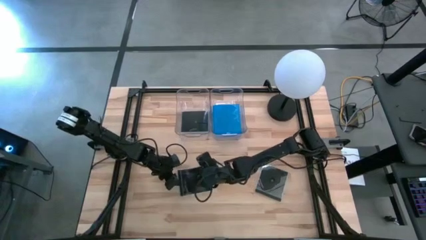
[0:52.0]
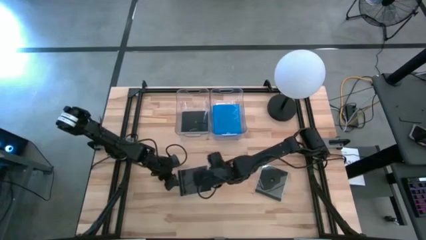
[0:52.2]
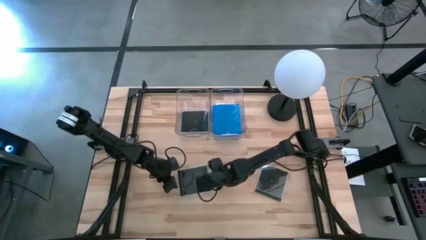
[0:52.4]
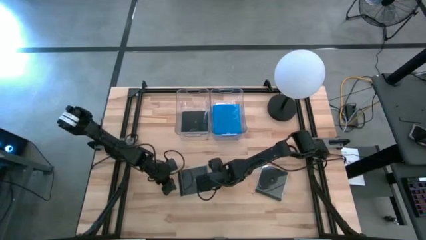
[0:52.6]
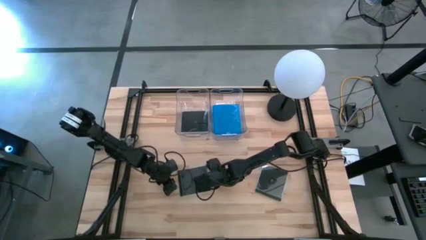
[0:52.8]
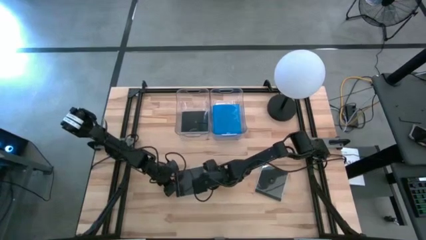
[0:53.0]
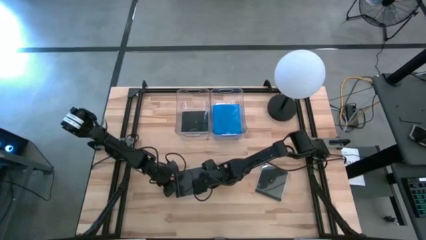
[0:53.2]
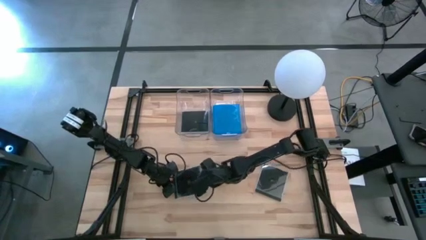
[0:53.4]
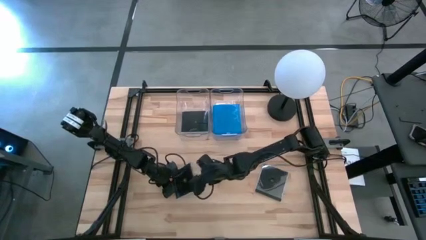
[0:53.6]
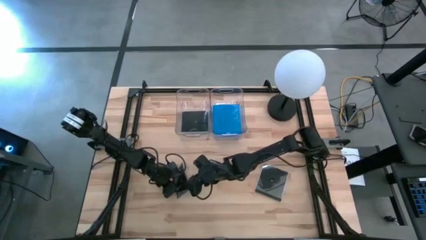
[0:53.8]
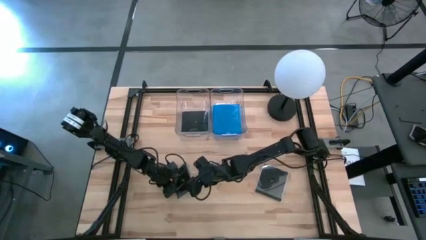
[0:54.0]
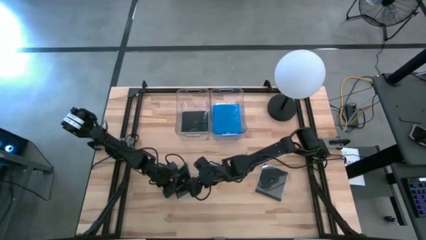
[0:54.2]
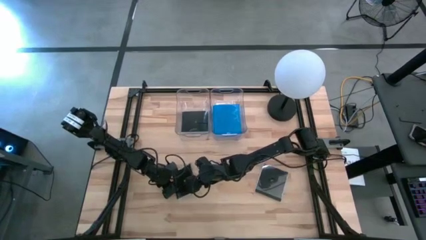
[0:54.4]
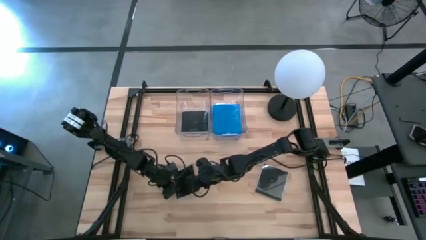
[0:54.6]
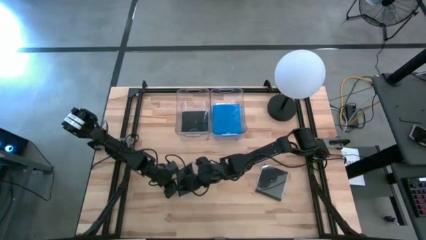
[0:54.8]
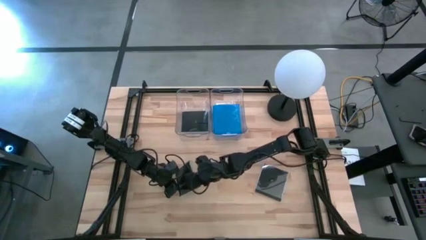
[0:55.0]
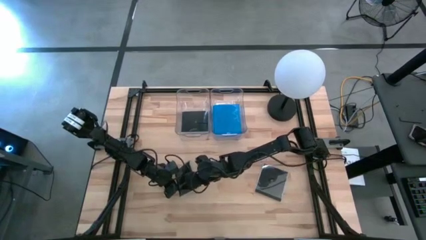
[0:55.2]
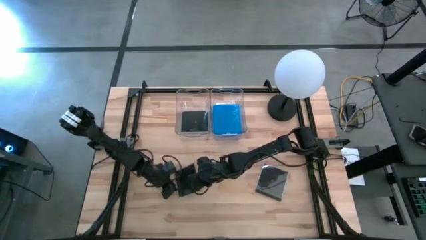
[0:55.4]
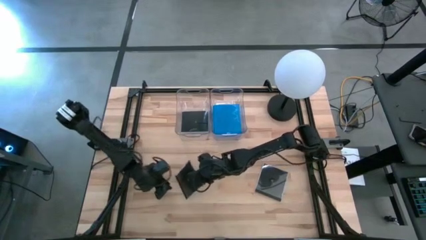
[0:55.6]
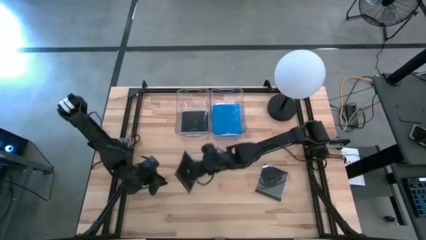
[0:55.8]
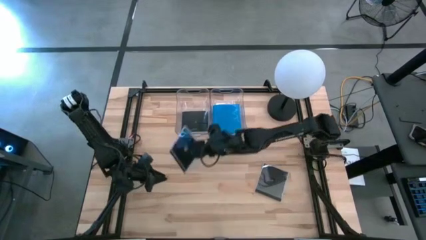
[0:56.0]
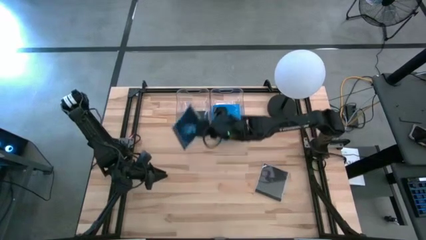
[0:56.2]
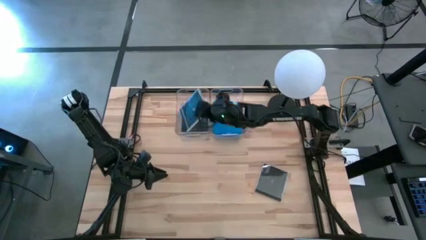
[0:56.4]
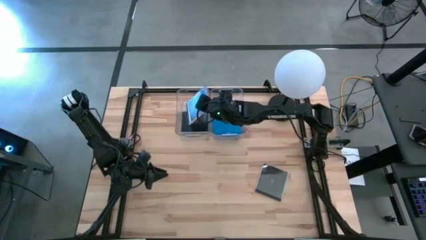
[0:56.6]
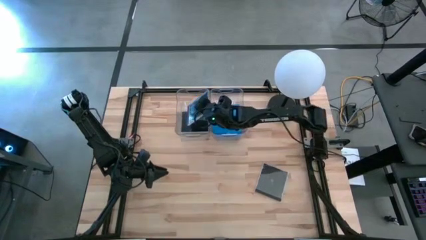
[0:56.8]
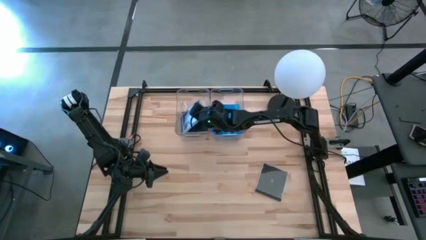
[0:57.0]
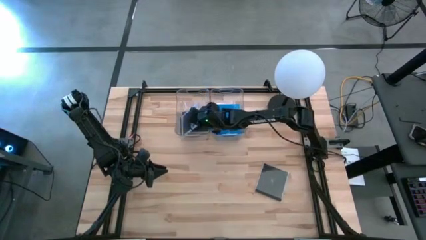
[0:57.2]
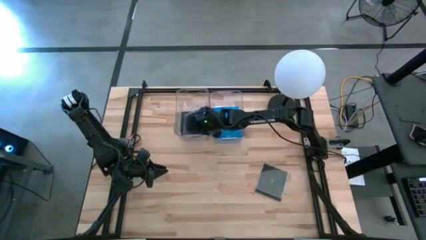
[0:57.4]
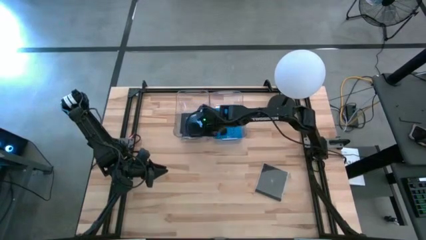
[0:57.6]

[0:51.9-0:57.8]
Task: Pick & place jewel cases by type
Put the left black CD case into the left transparent bin

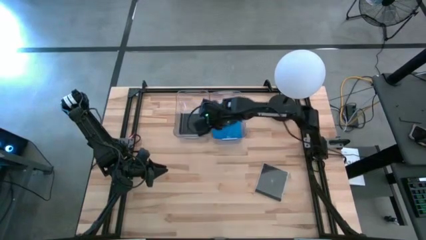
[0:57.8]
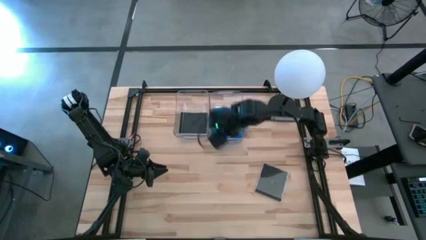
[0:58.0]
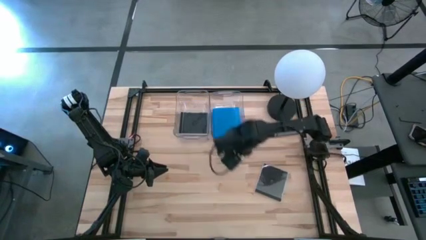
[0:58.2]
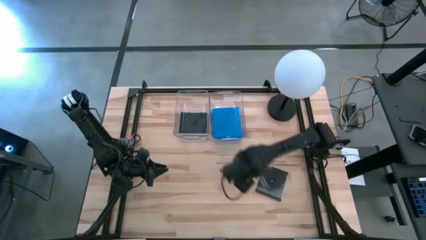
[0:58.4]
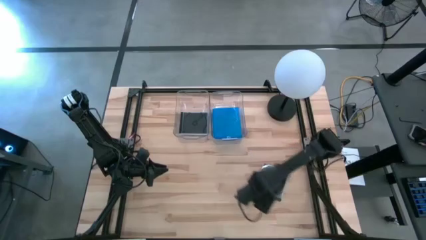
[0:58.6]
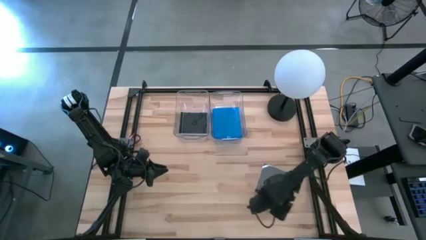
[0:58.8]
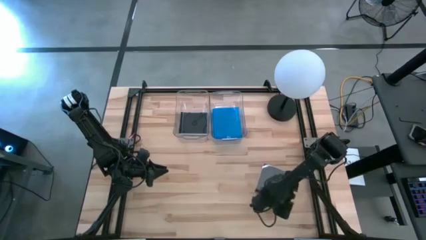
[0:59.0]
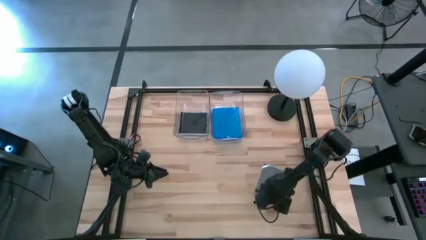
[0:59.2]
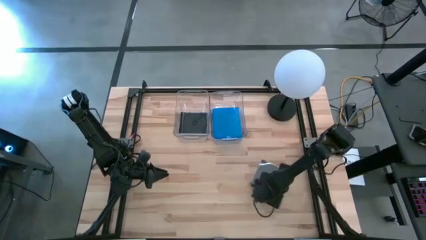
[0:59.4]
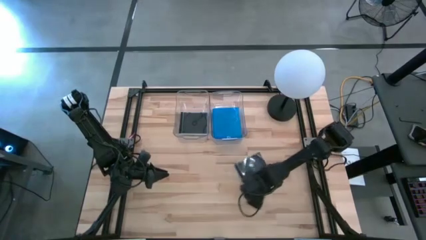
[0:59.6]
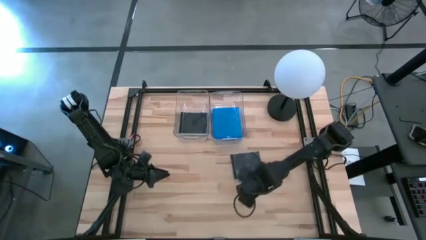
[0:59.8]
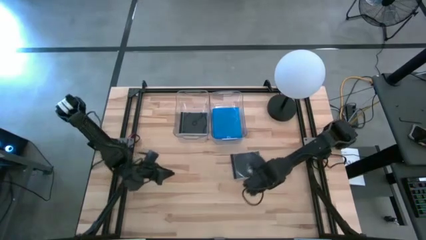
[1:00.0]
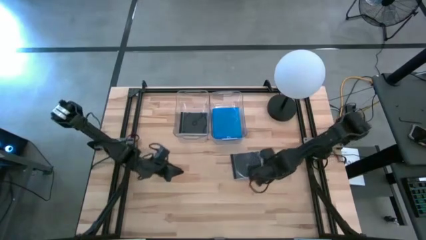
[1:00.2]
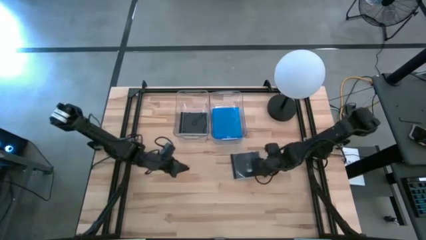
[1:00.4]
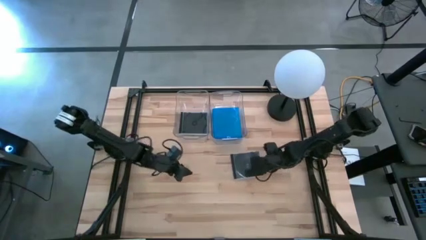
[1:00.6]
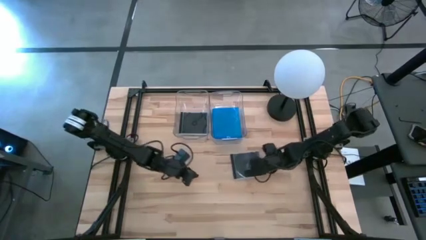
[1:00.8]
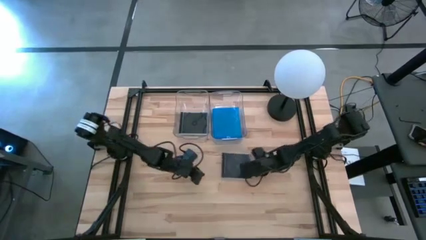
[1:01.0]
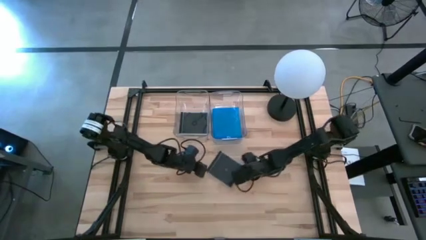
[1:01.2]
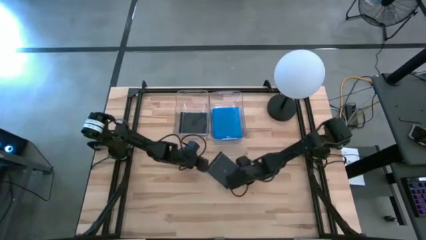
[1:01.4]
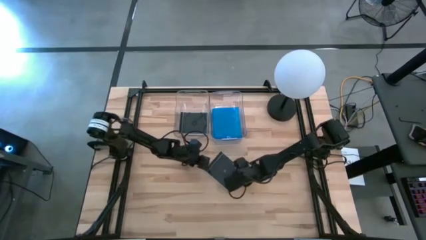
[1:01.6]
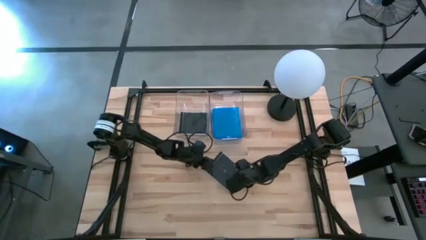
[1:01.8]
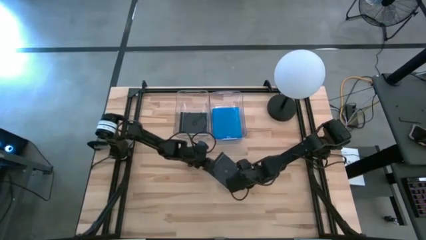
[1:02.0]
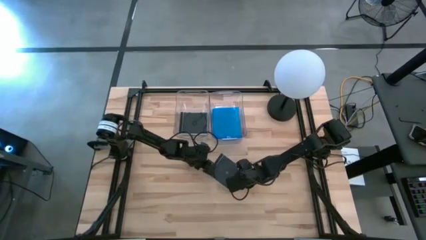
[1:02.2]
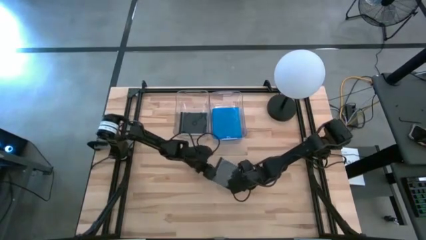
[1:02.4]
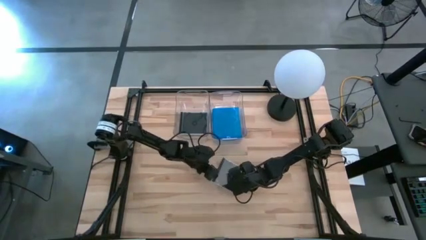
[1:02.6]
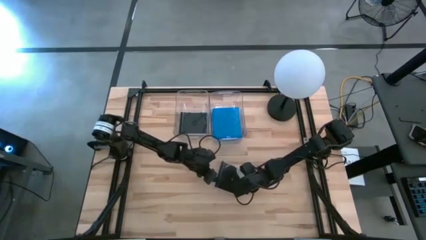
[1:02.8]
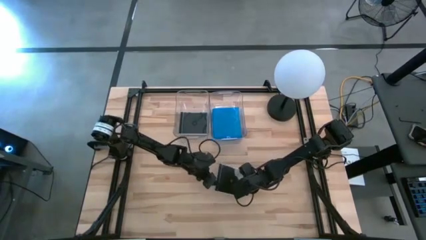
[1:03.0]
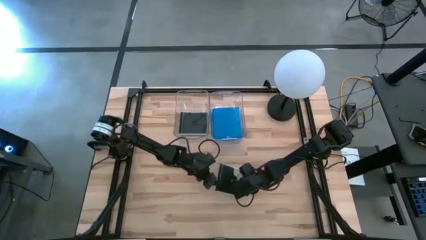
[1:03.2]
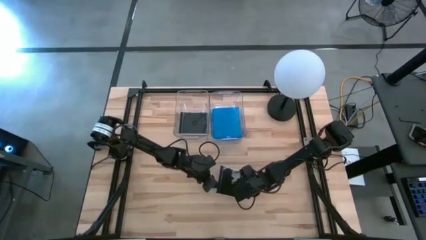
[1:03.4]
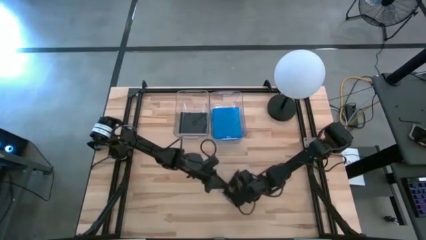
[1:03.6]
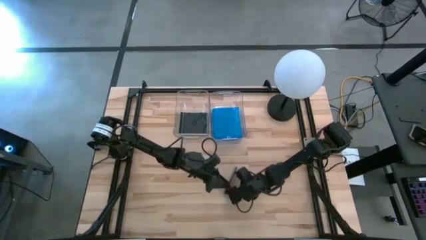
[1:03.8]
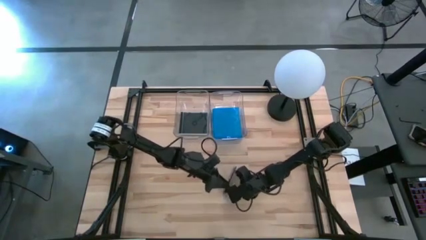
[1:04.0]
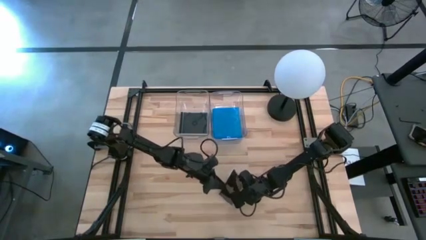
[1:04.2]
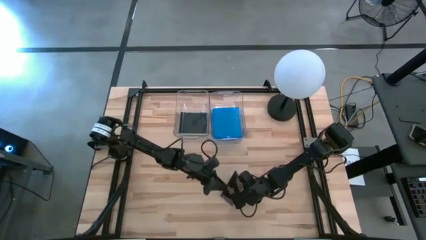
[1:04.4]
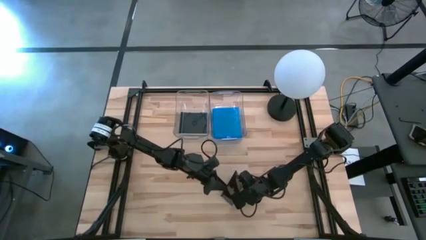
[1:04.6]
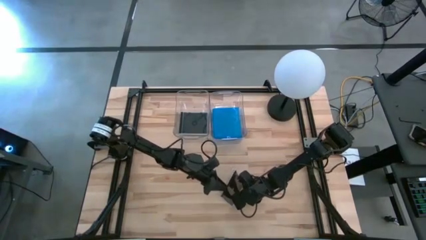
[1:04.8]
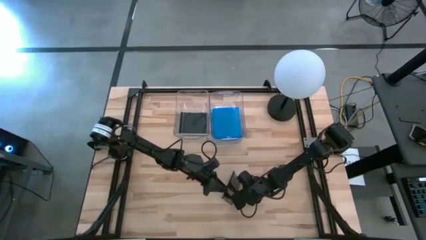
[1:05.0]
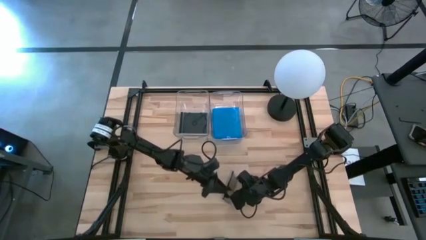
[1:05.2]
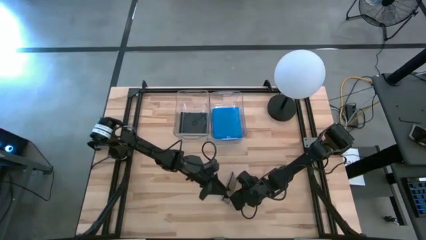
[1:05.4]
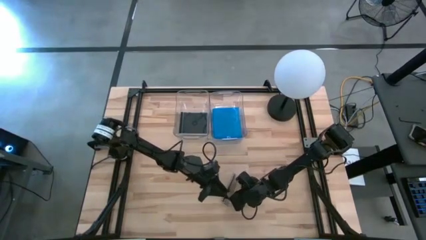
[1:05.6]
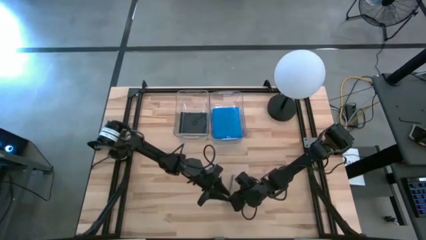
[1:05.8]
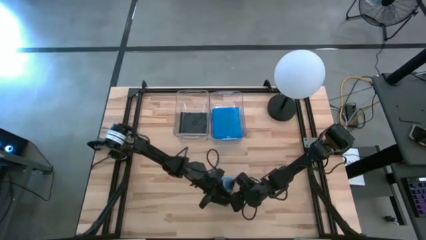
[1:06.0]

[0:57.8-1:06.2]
Put the black CD case into the left transparent bin
